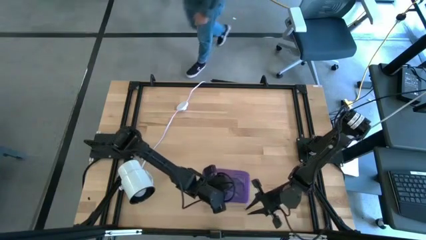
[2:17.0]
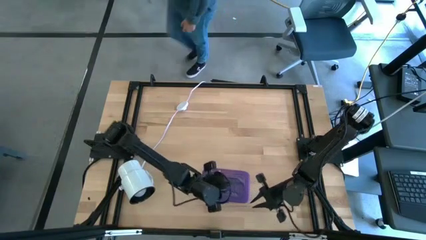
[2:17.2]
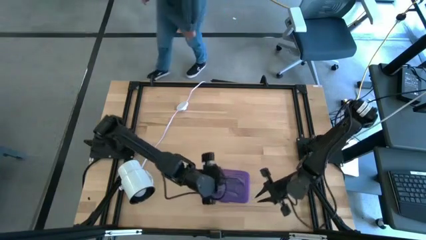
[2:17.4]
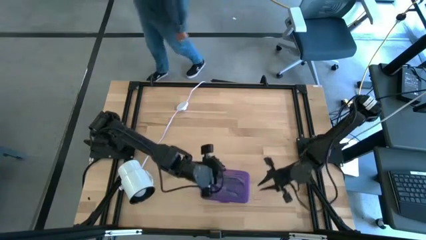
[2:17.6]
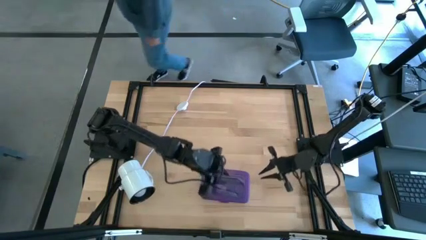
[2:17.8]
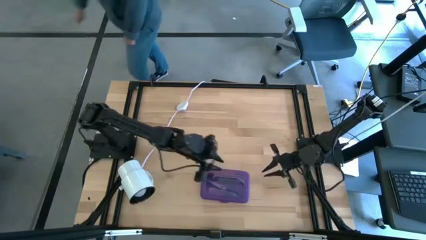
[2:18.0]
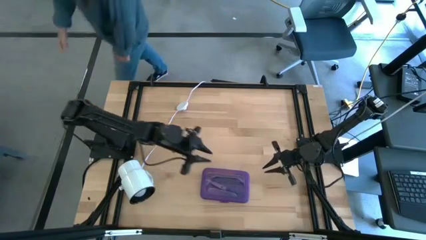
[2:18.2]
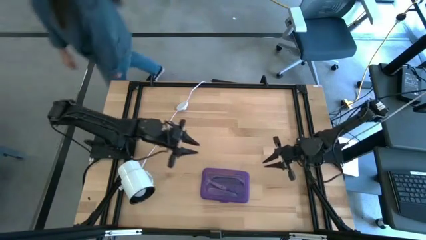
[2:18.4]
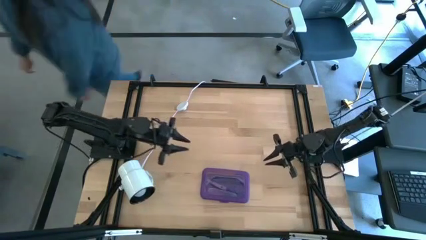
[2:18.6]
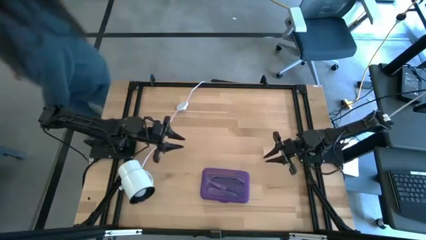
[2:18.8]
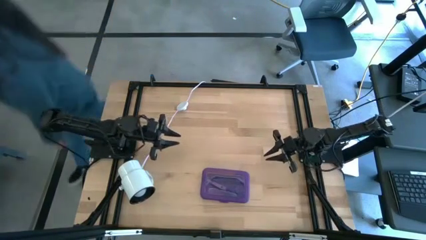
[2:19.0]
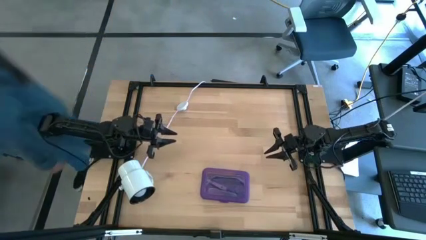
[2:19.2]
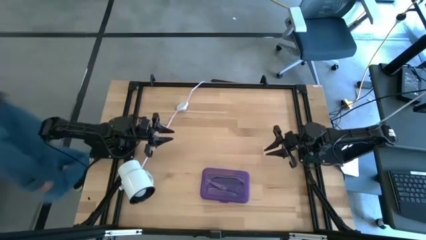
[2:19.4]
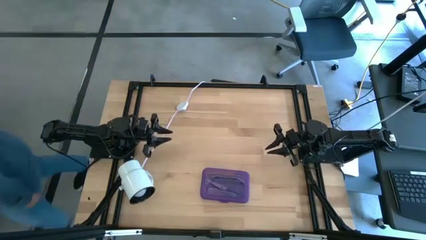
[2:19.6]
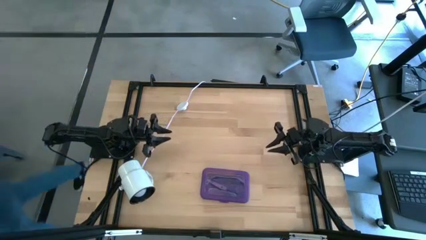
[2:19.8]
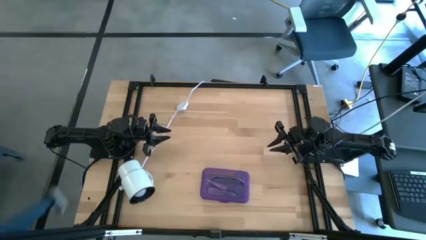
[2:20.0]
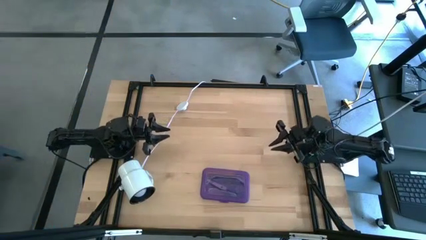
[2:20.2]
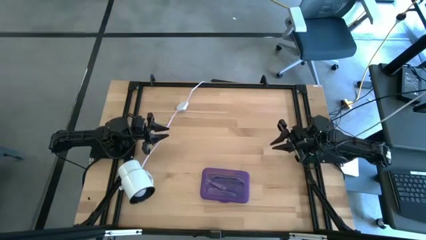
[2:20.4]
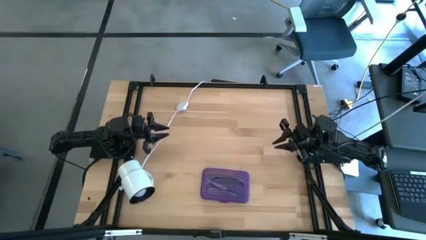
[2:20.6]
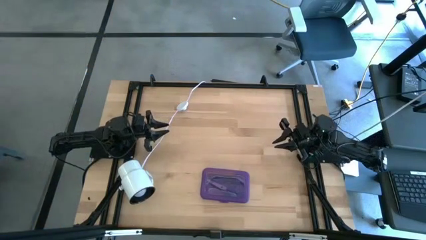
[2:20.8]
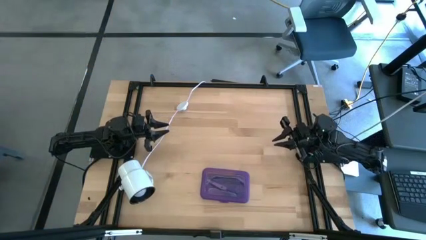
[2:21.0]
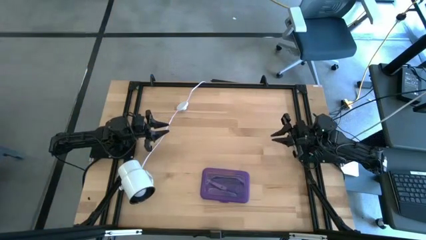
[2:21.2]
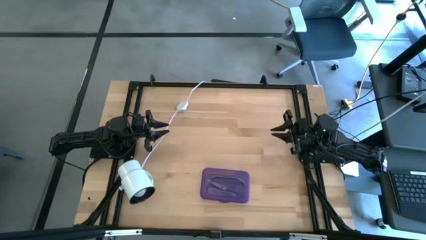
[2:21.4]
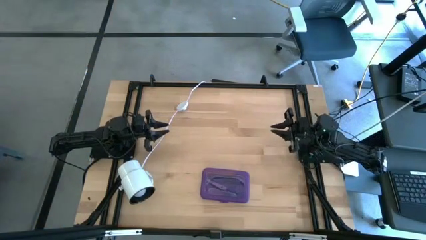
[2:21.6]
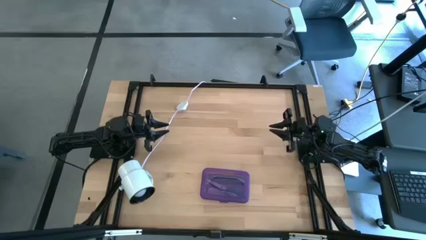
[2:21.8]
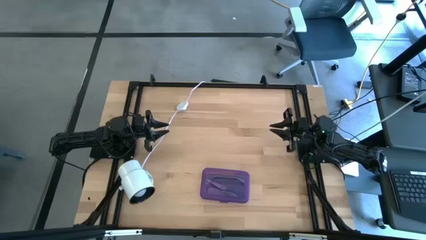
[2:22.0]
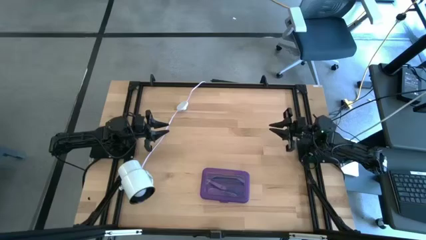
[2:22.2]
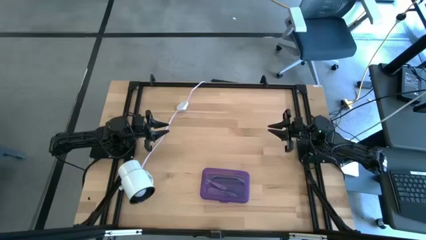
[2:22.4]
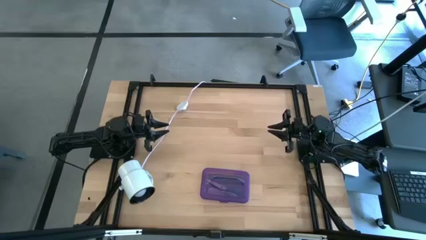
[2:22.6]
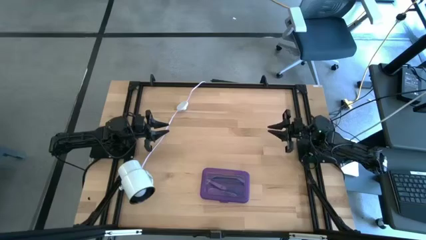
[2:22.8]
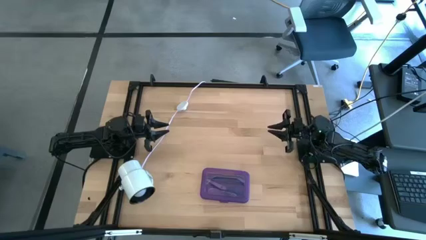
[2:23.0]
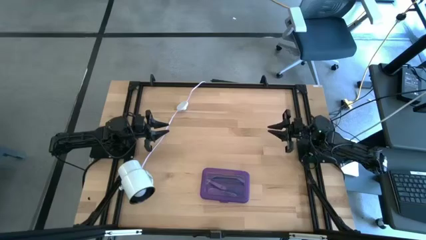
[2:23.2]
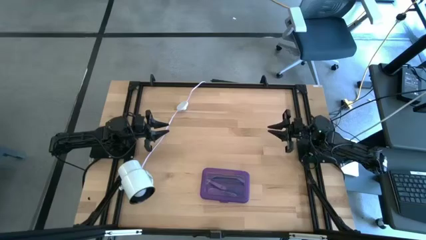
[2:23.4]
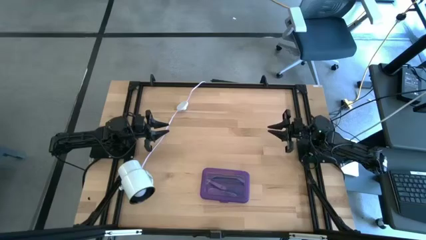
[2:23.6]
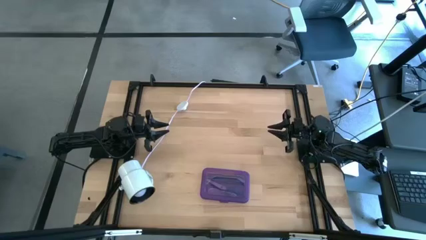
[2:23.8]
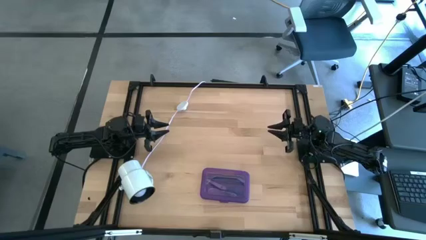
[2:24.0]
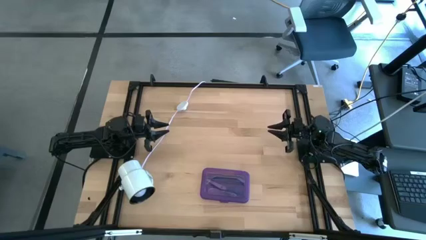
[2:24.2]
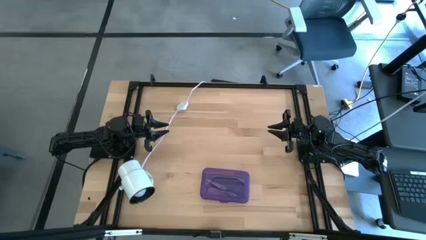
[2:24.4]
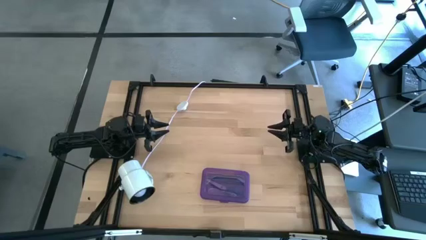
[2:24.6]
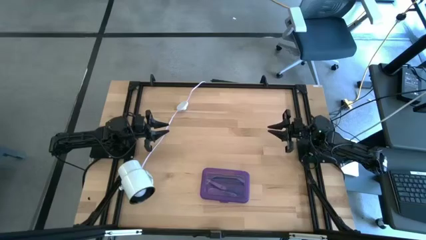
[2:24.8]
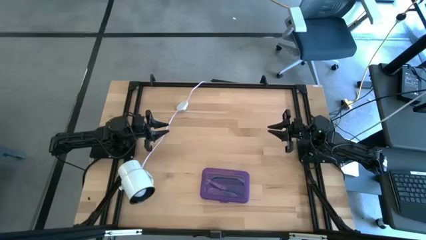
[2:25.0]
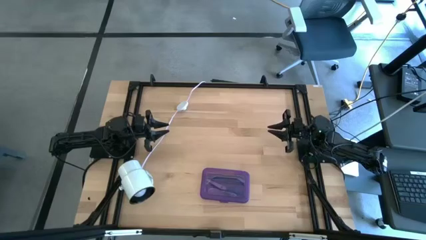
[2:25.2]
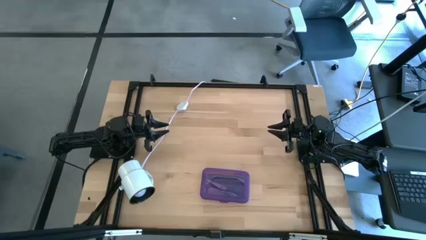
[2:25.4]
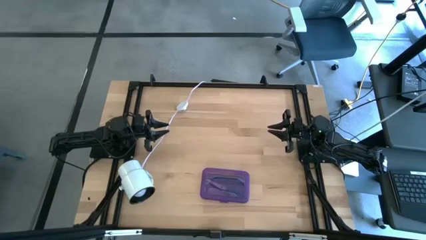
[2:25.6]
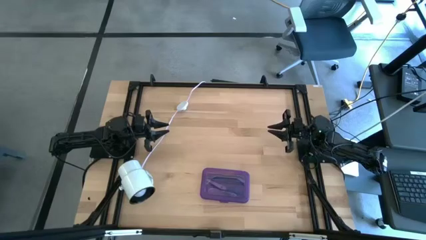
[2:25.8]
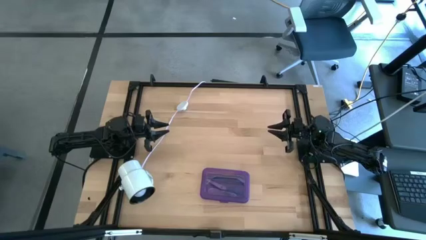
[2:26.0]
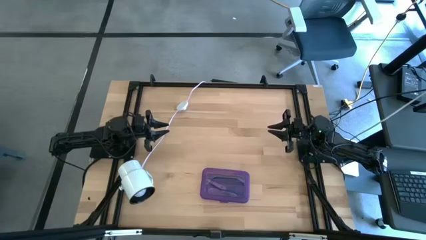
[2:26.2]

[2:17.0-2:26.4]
Task: Pick & place school supplies into a supply box
Return to Home Position

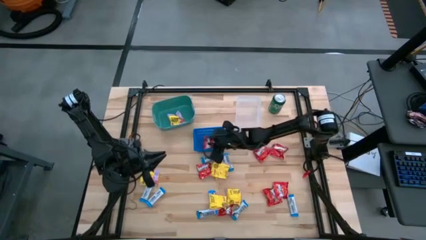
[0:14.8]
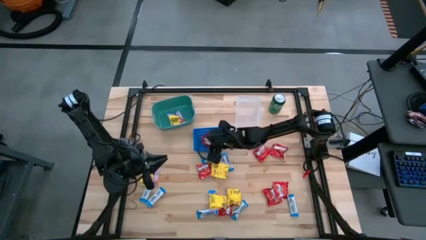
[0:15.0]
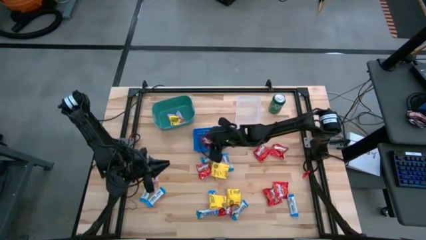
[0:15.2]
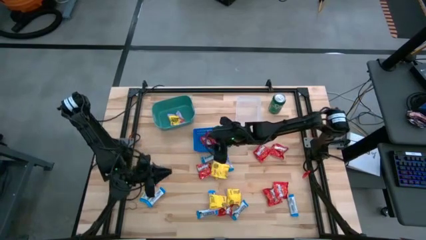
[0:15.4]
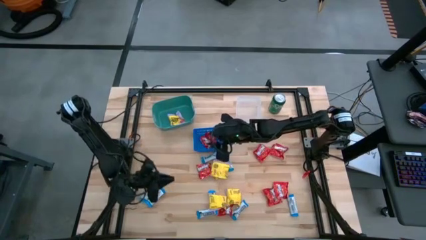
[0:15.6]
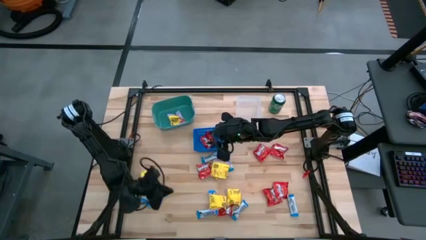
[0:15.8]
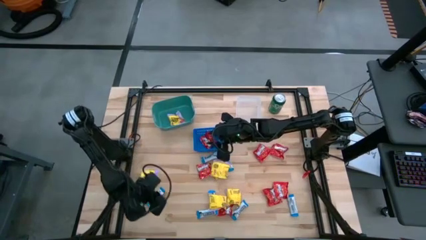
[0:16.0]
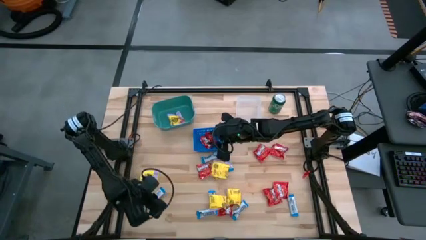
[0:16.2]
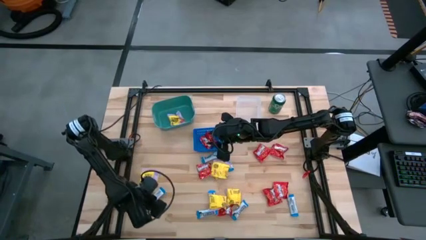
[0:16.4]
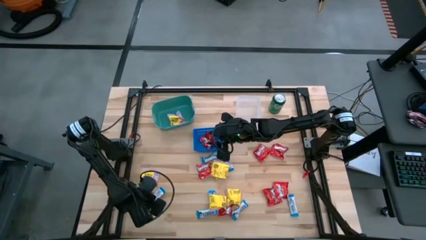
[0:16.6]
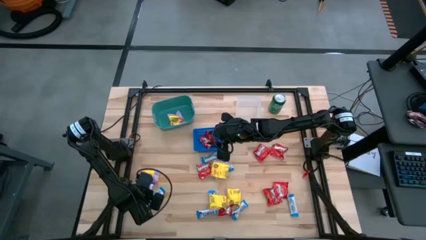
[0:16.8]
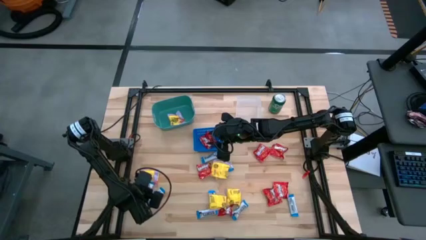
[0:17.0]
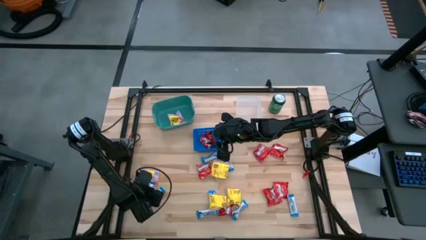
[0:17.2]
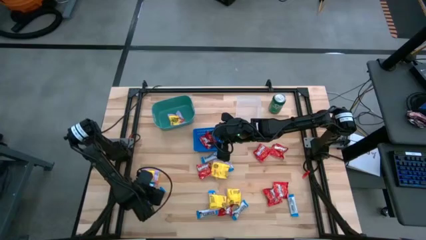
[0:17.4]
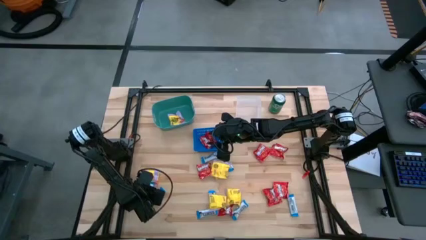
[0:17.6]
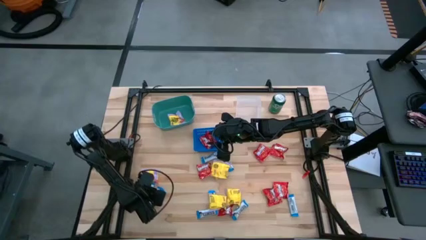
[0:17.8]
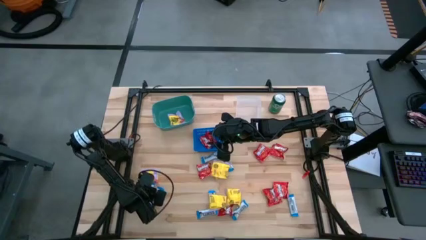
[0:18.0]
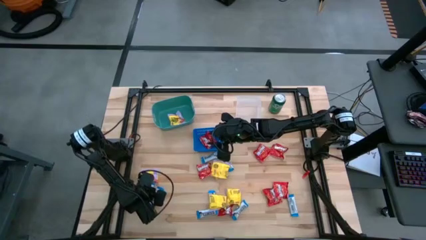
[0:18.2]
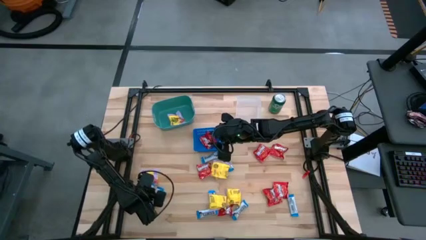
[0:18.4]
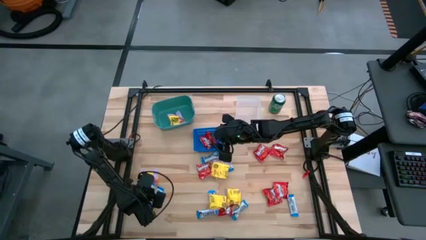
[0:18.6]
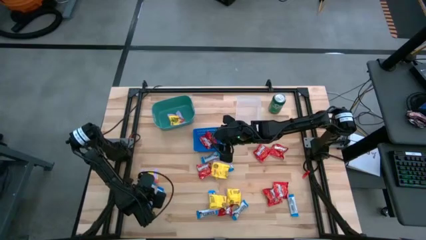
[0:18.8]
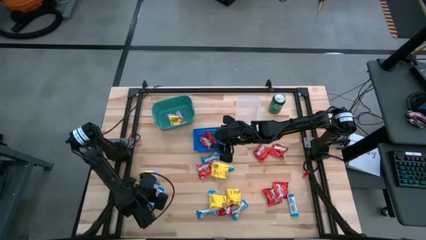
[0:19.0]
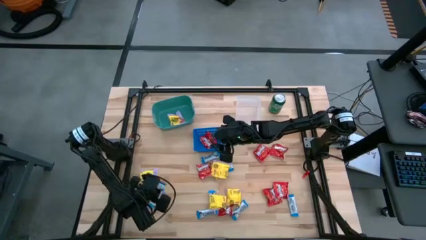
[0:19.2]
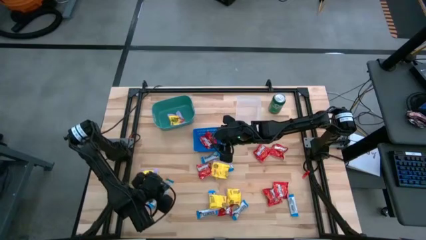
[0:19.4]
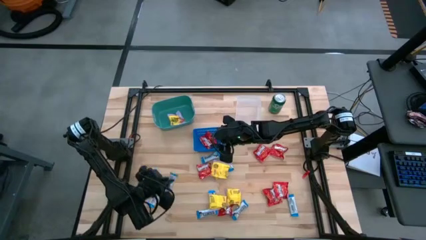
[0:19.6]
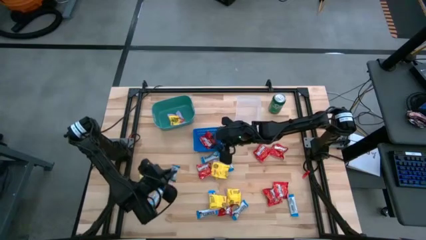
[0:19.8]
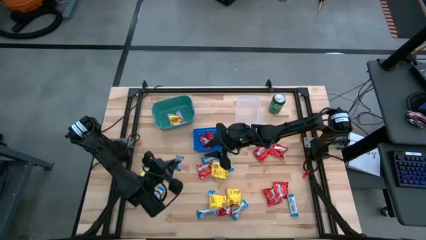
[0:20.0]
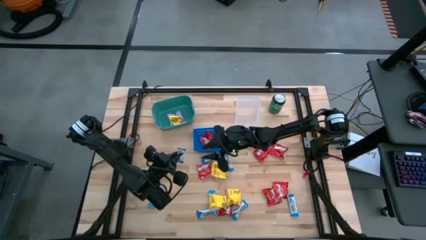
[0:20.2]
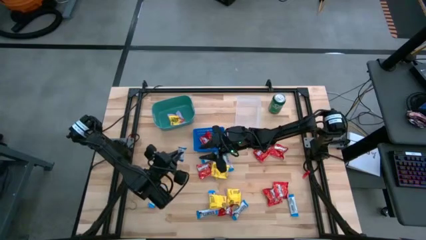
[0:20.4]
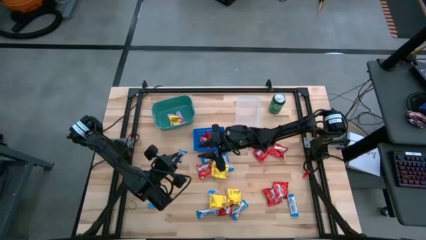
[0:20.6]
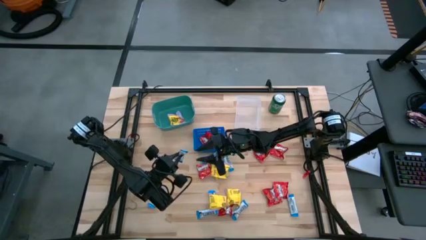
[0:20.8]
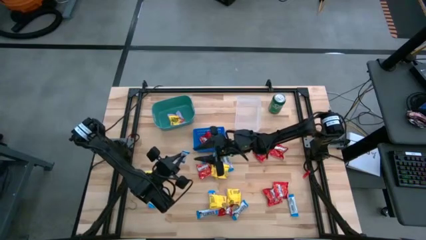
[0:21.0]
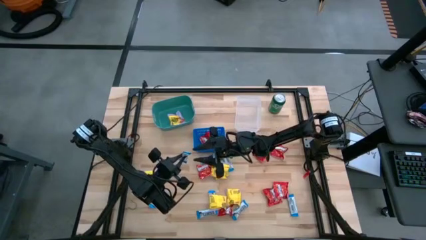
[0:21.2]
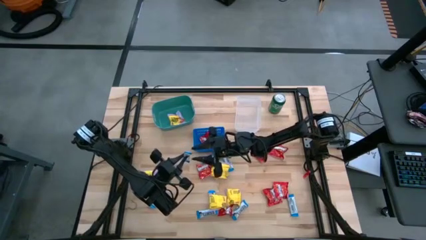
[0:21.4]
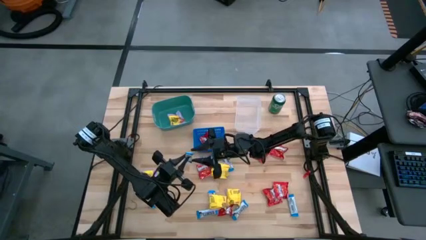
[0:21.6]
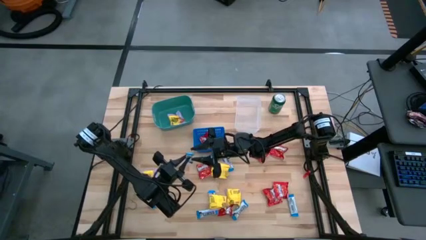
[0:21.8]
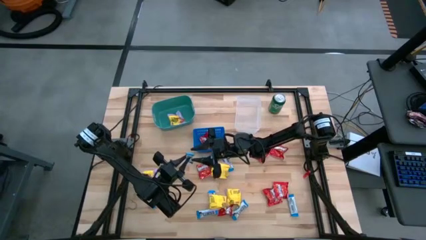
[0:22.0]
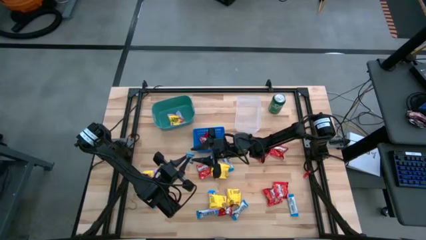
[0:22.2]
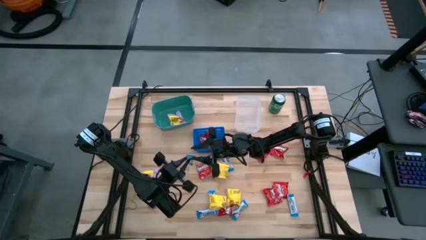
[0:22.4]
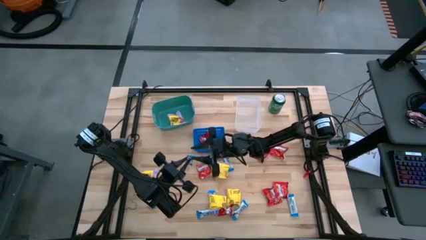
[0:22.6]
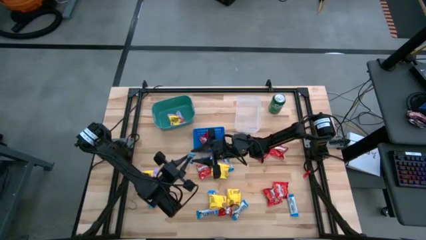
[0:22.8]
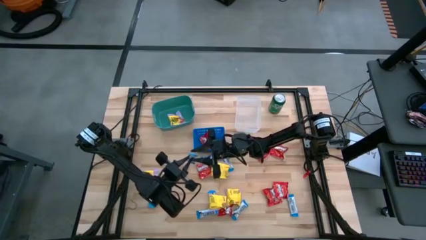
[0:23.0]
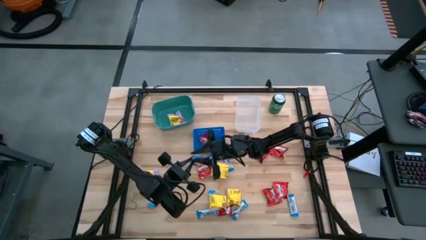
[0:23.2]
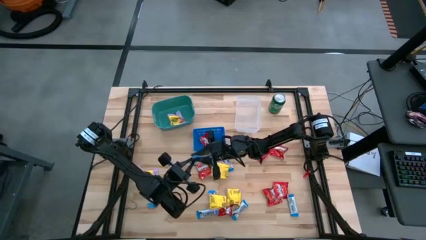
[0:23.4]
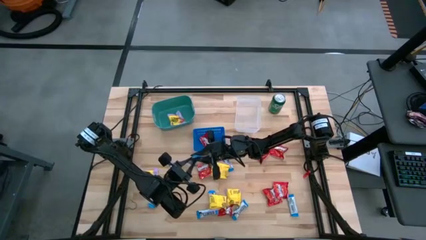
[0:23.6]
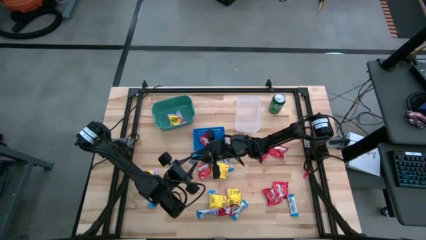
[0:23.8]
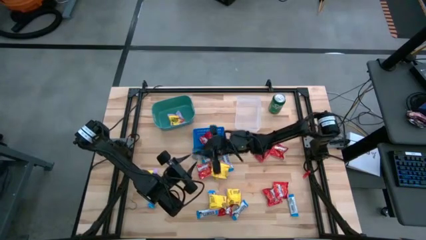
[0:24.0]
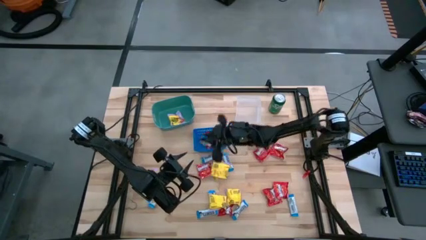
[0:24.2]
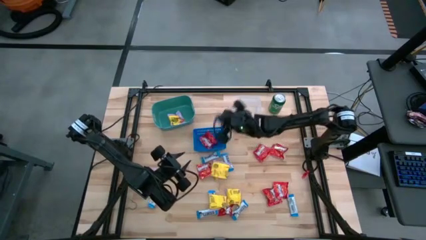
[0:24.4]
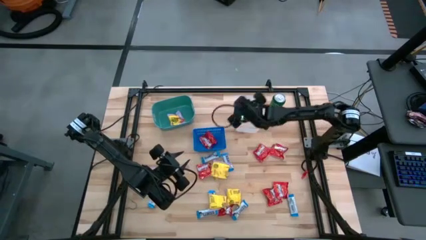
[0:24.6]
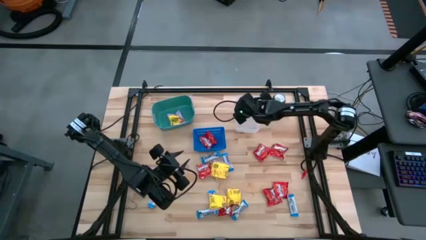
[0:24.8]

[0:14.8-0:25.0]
Task: Sort candy
Put the hersheys bar into the transparent bin
